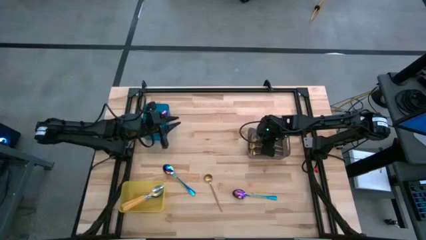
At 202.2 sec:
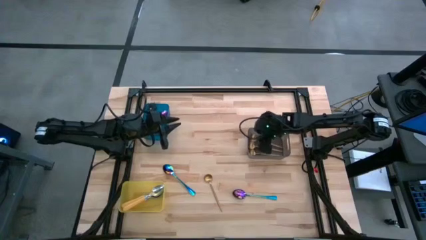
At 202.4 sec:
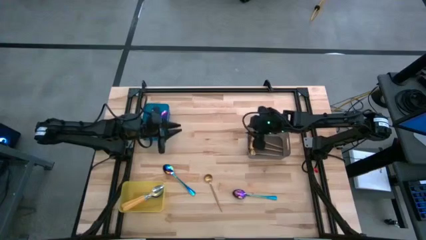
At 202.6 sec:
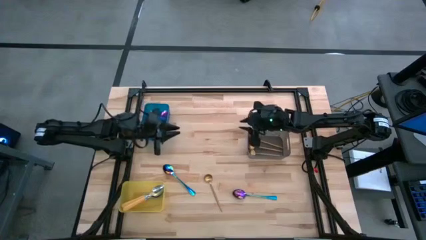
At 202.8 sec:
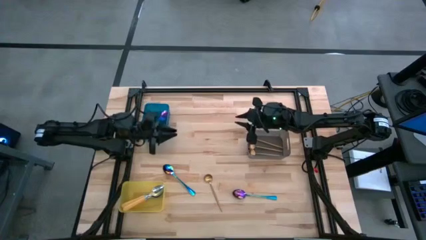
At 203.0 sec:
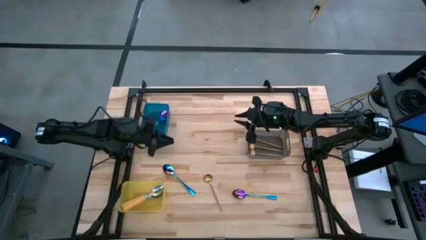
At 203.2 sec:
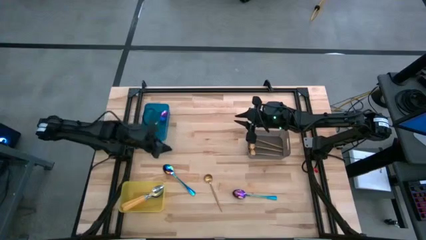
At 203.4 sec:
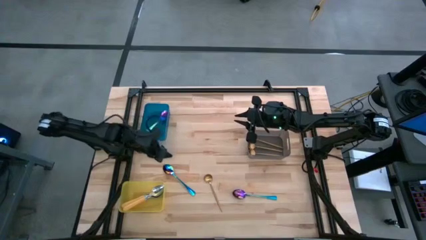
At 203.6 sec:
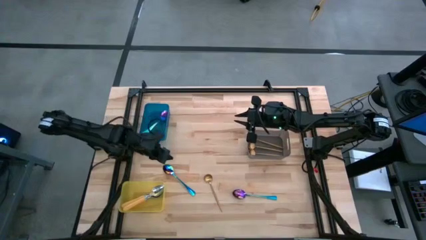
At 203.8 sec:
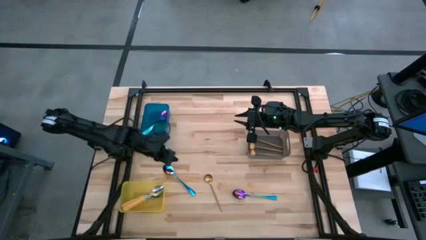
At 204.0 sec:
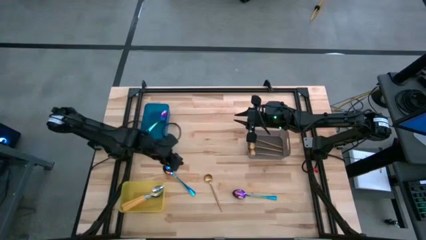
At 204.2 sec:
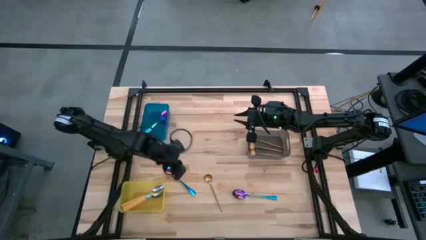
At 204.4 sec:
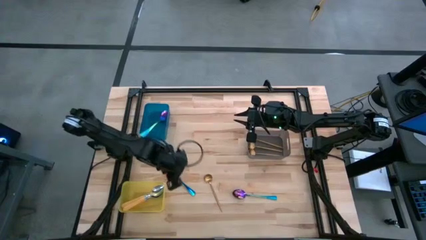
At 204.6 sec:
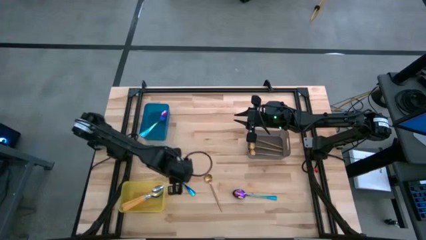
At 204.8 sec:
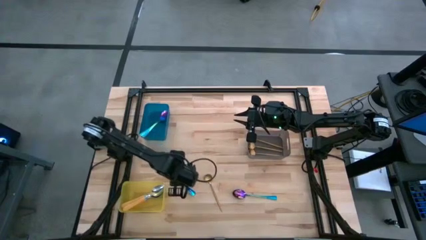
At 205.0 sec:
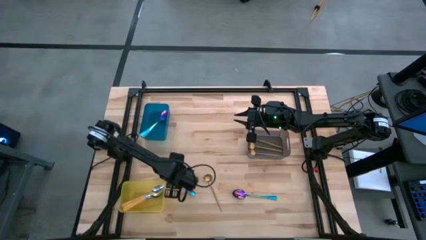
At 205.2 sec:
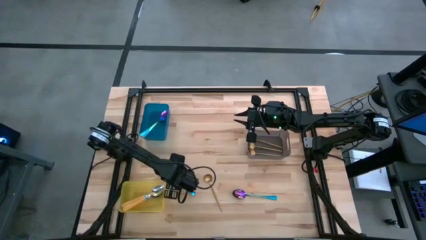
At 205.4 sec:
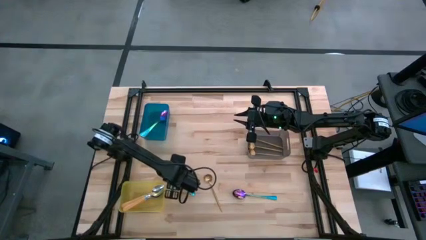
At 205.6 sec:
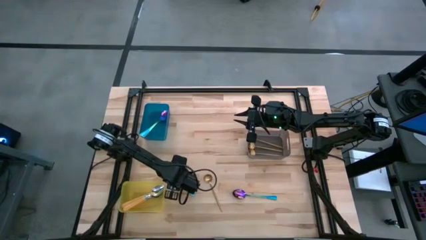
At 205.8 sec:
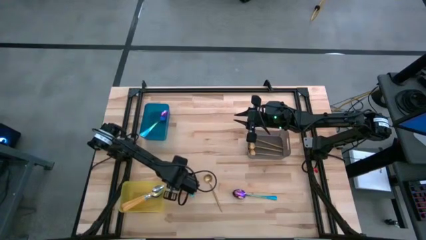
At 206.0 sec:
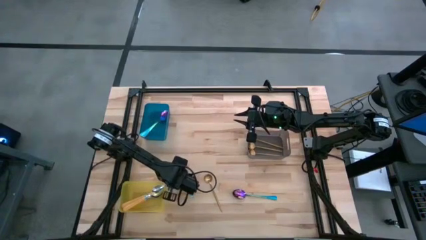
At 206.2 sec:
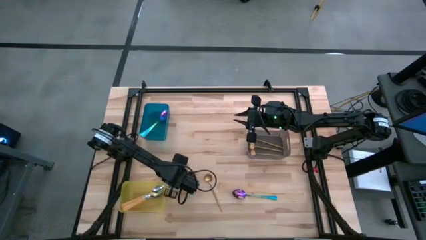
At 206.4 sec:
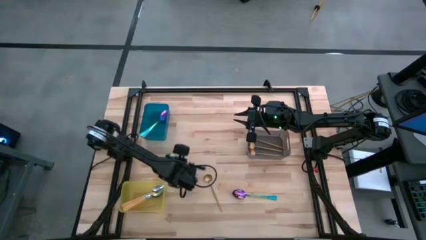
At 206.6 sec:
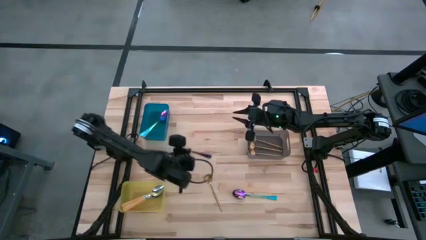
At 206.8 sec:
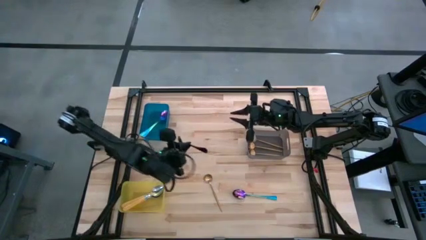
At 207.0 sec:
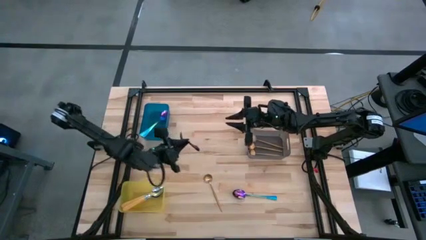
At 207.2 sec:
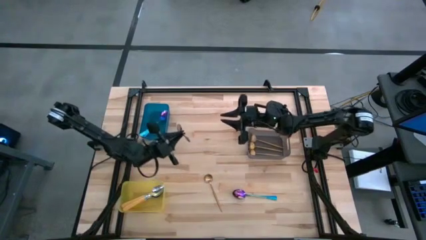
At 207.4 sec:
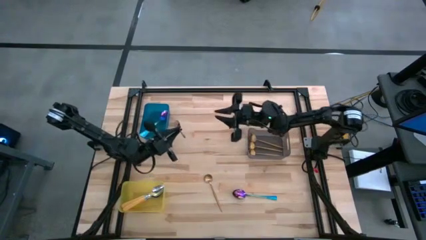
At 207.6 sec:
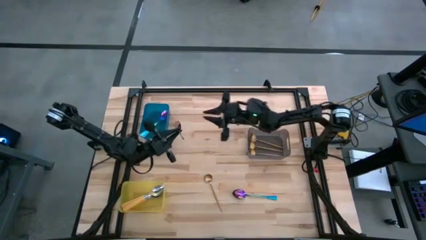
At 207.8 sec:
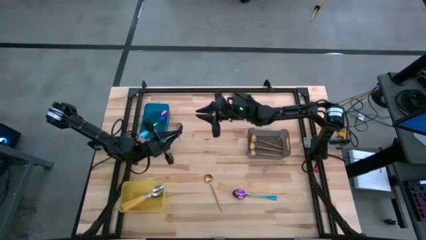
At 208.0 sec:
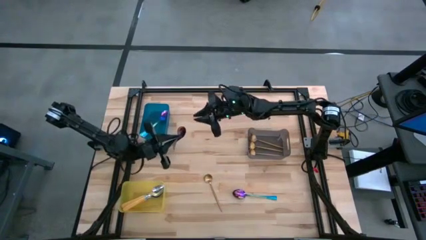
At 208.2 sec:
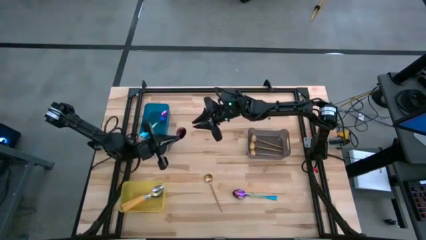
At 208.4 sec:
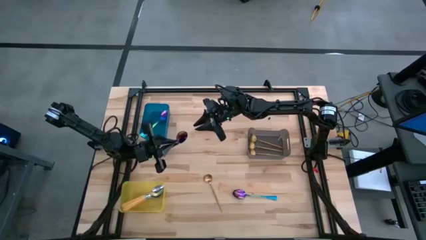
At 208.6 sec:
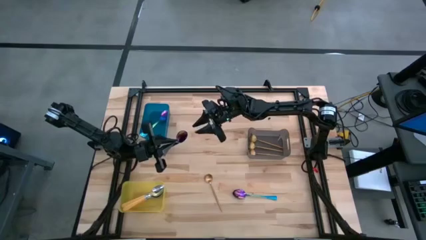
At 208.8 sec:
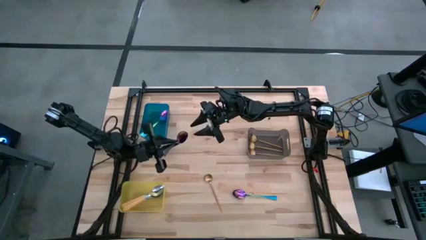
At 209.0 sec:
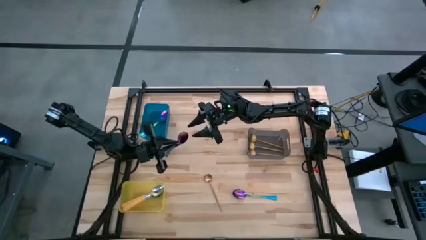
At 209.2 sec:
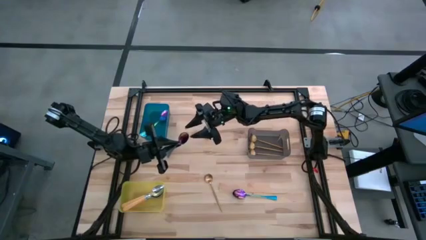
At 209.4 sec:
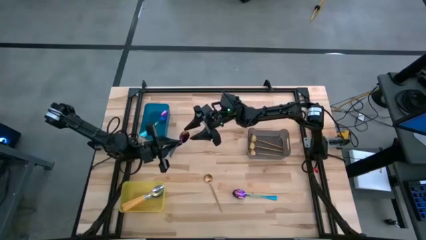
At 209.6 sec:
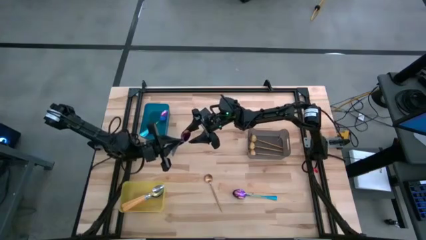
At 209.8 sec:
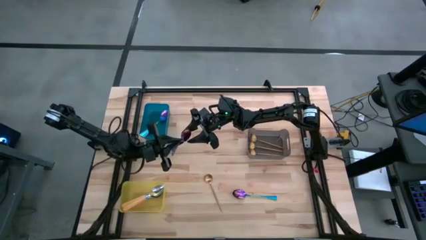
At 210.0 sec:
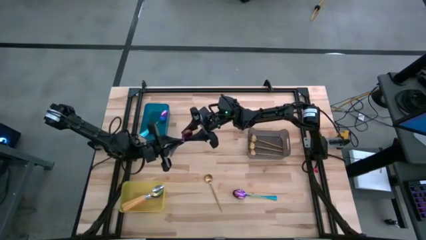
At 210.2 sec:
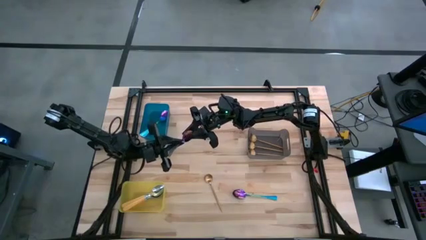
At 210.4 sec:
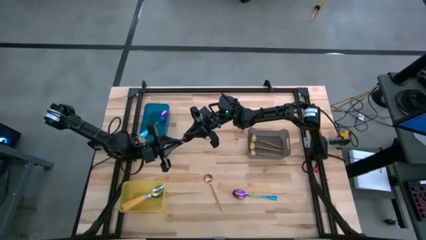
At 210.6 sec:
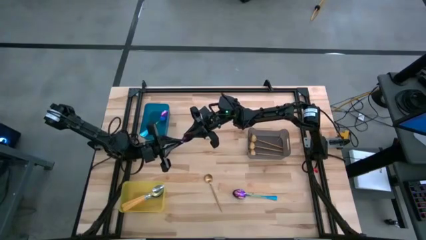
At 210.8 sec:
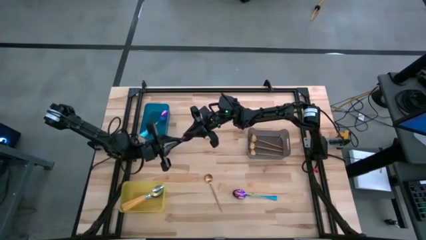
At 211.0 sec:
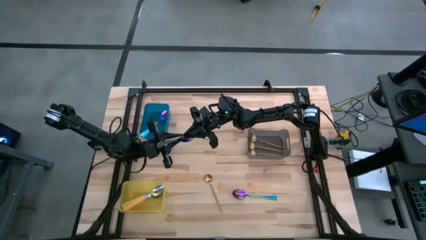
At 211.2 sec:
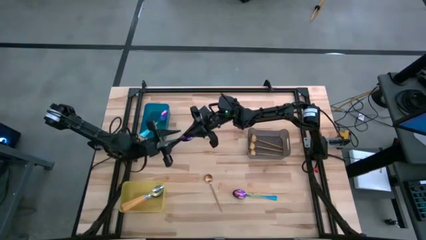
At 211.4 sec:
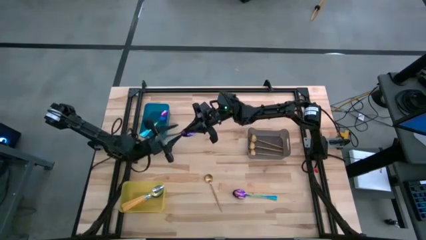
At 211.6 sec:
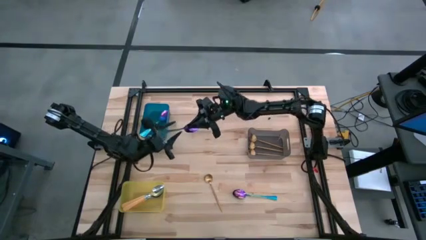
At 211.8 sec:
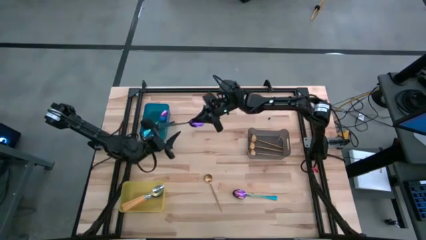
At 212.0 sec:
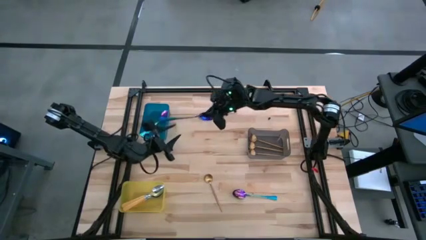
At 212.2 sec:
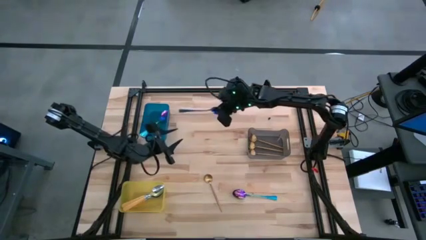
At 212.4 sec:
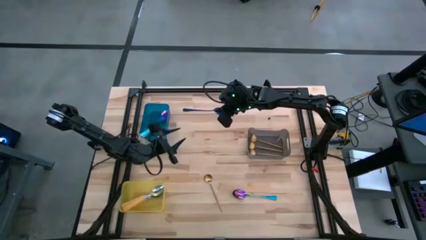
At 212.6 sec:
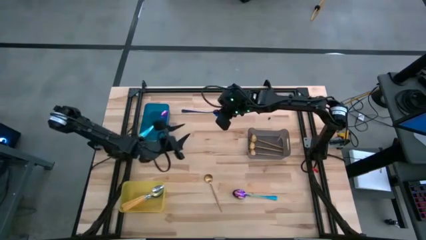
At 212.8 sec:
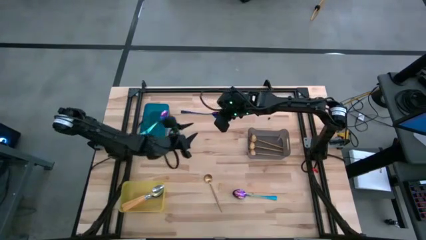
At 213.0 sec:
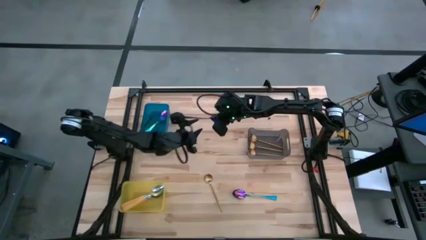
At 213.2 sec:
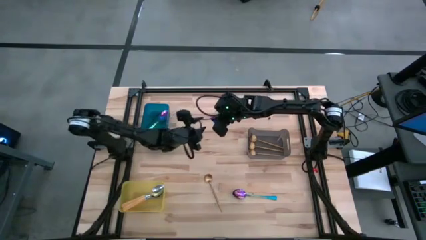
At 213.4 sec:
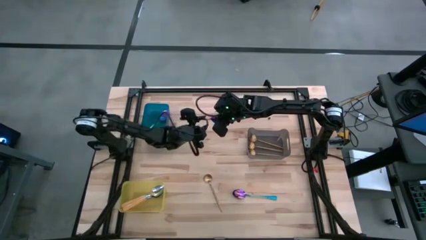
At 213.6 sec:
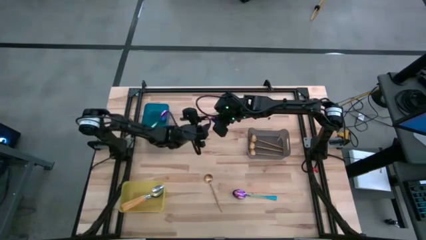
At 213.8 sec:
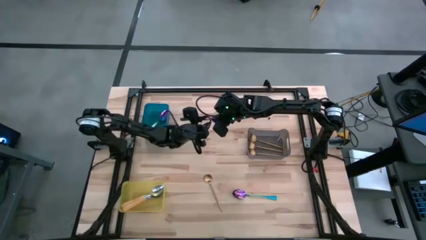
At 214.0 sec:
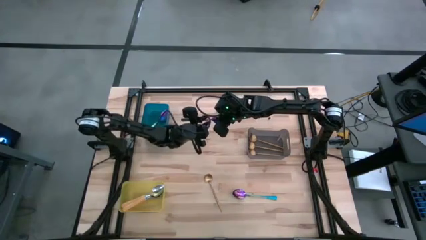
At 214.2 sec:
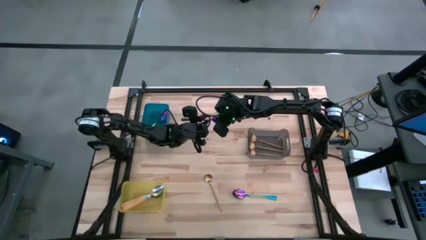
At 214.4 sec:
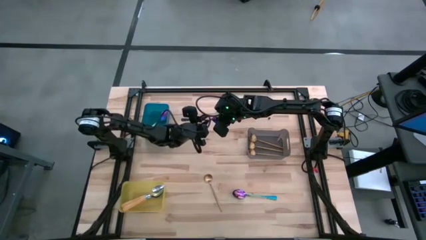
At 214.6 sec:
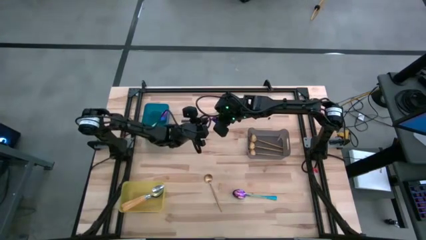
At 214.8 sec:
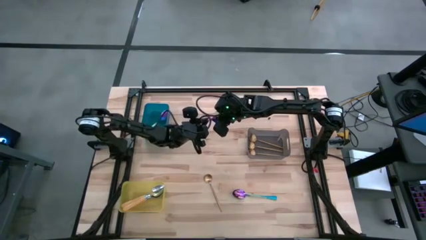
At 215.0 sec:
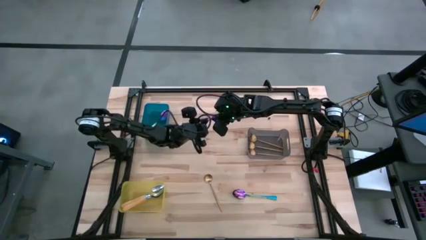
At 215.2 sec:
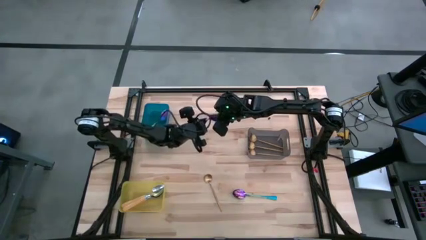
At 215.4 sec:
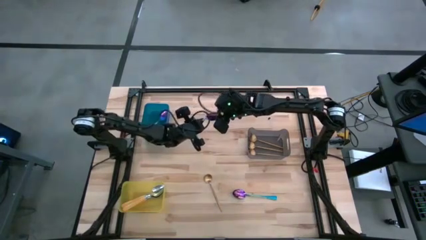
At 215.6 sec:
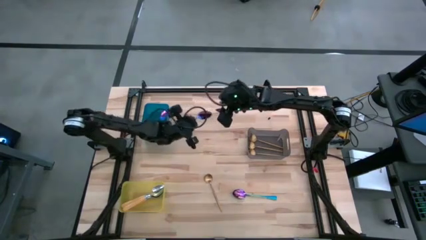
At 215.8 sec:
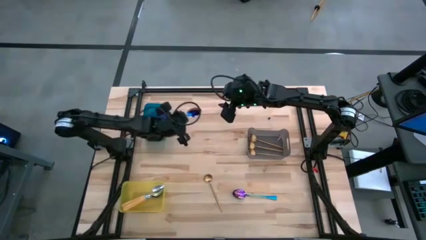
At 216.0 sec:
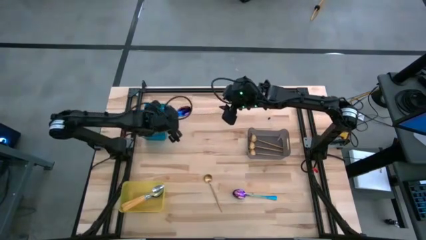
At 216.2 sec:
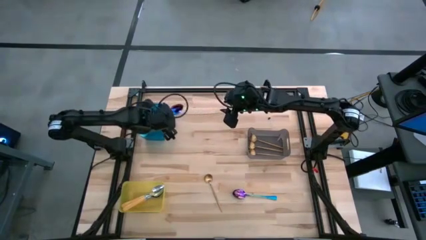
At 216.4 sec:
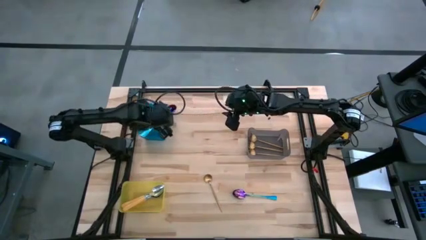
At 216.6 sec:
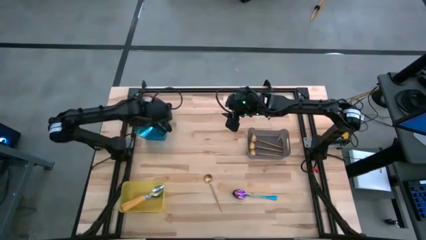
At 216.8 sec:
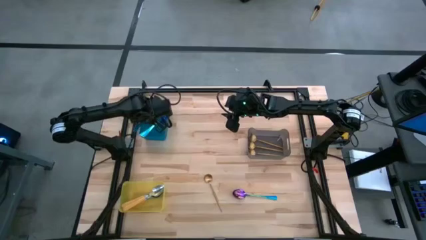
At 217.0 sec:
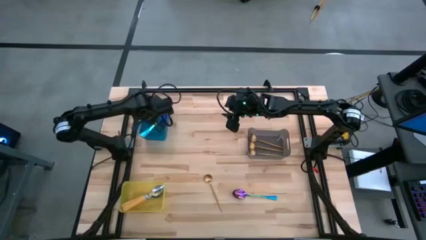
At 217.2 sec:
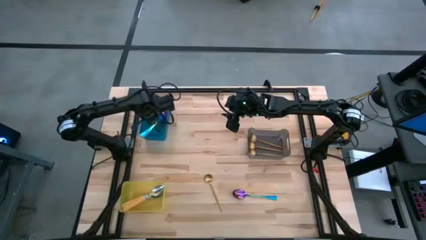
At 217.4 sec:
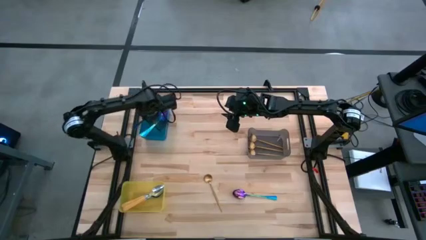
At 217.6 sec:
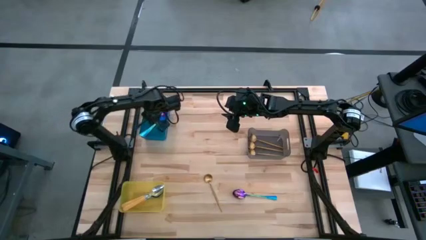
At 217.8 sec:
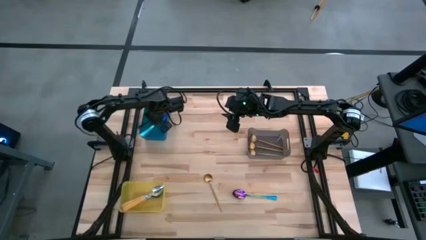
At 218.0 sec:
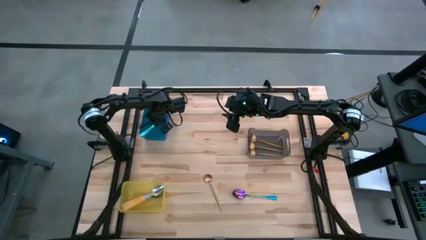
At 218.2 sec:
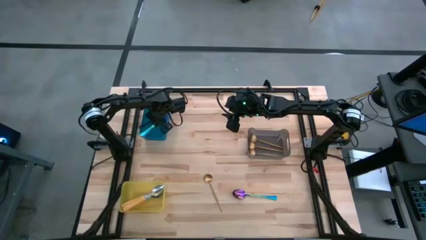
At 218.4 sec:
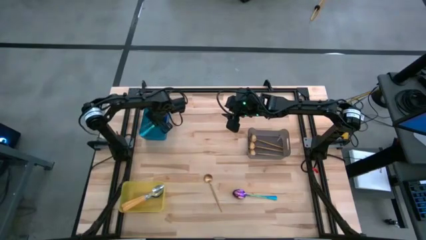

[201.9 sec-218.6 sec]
Task: Sort silverware by color (type)
Put the blue spoon into the blue bin
